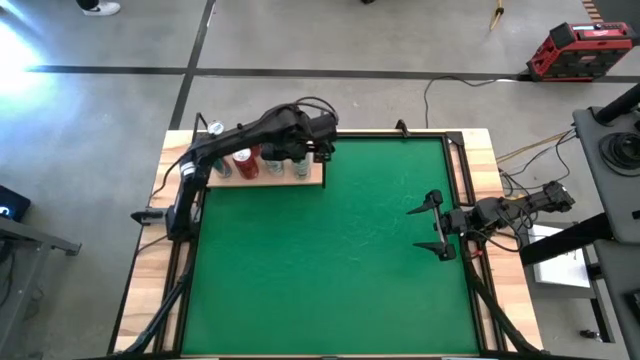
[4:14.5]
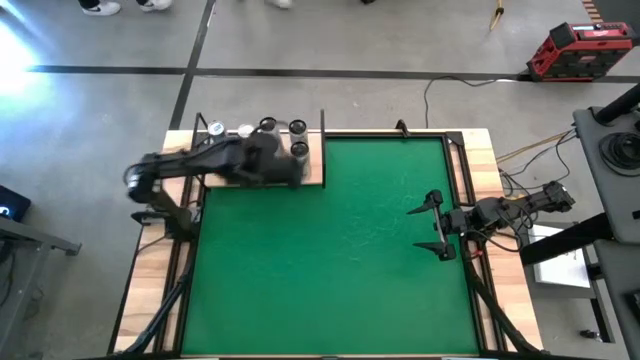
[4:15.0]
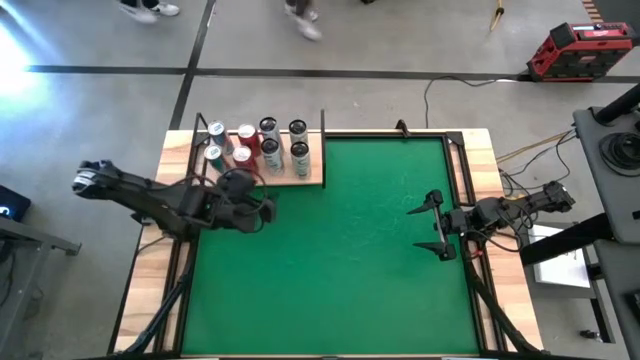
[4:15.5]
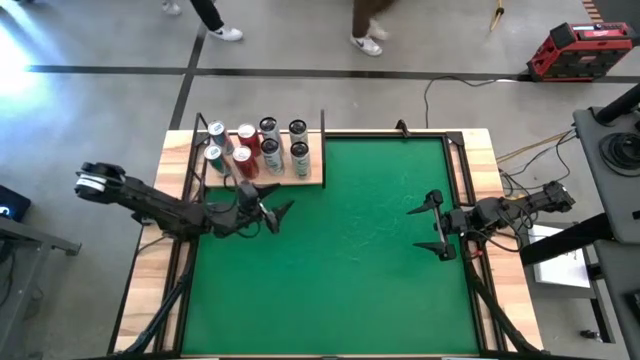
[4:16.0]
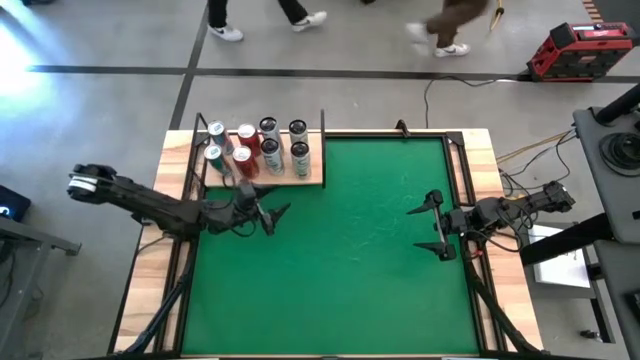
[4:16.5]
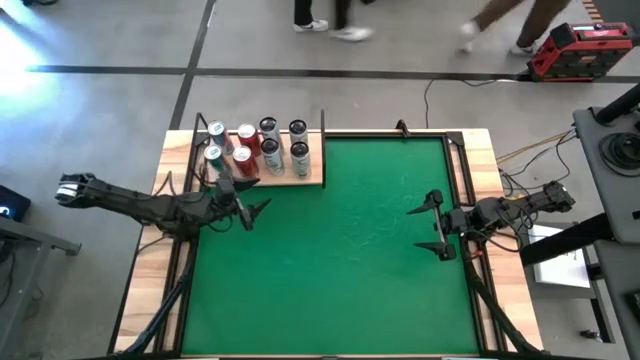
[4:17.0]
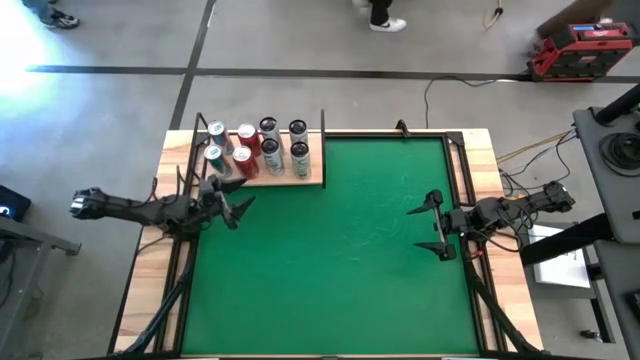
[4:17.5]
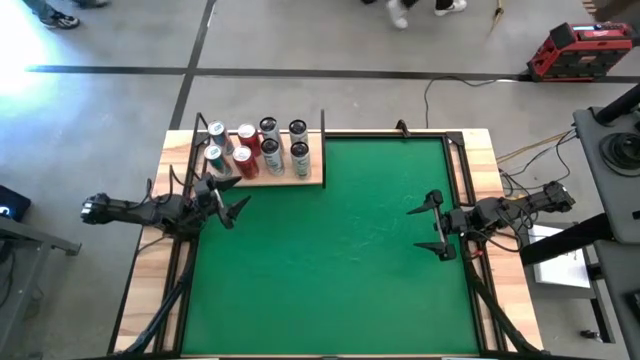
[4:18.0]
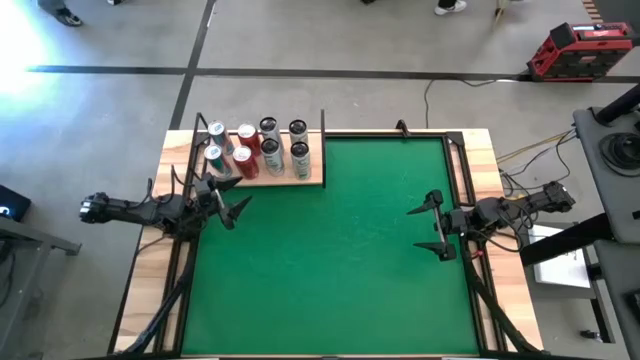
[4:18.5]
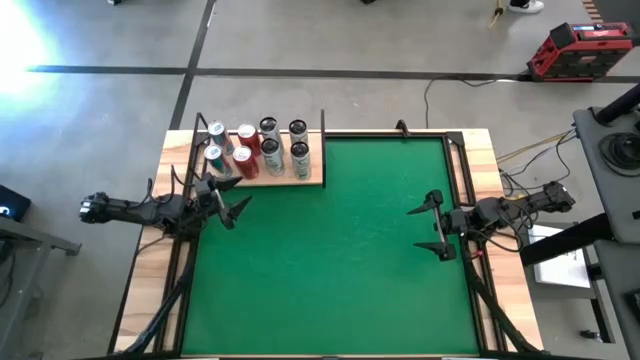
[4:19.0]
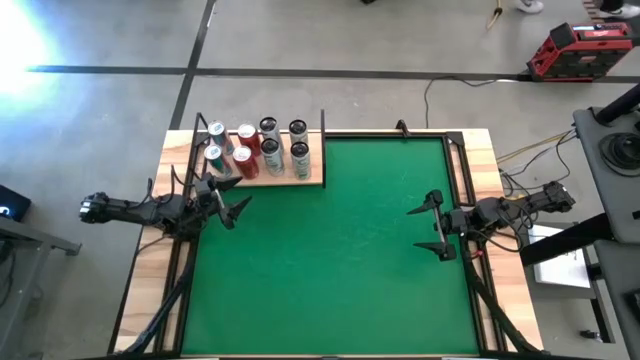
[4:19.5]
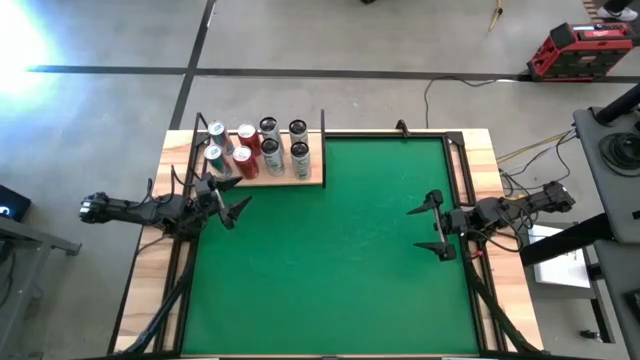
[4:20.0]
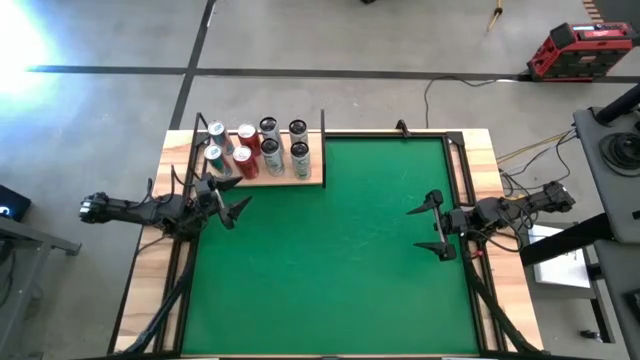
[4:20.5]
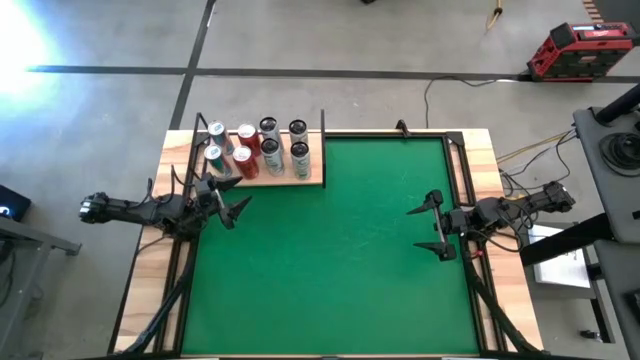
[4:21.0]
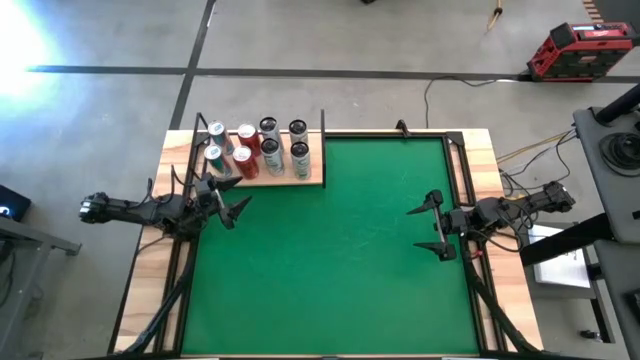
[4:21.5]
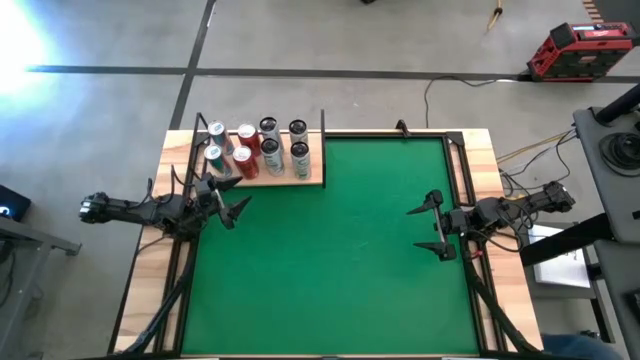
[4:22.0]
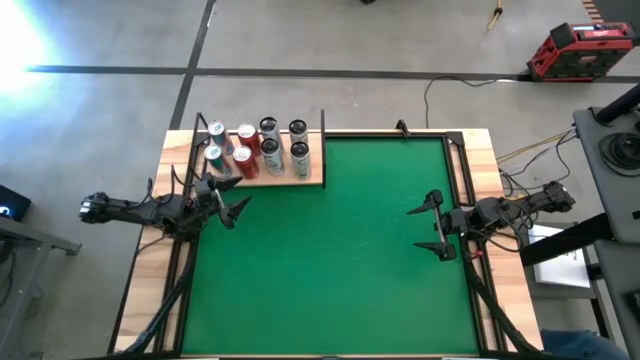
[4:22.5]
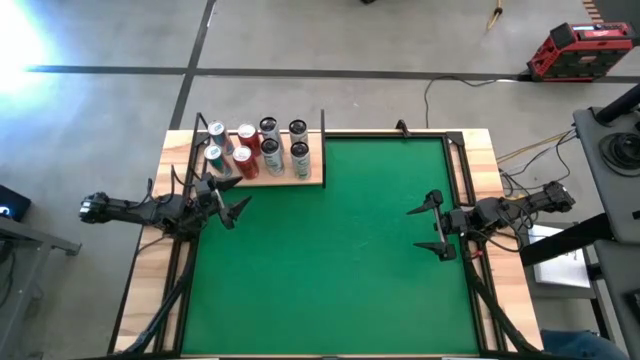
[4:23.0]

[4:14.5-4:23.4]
Task: Place canned beverage on shelf
Return to Home Position

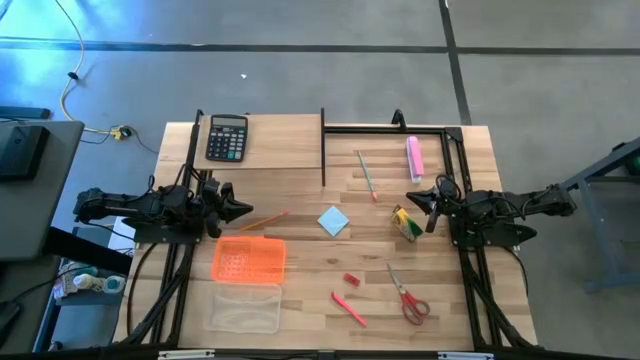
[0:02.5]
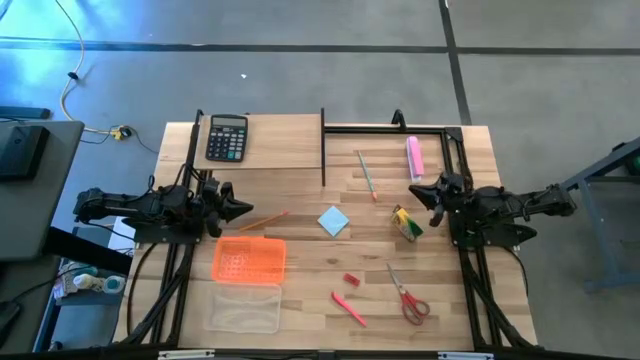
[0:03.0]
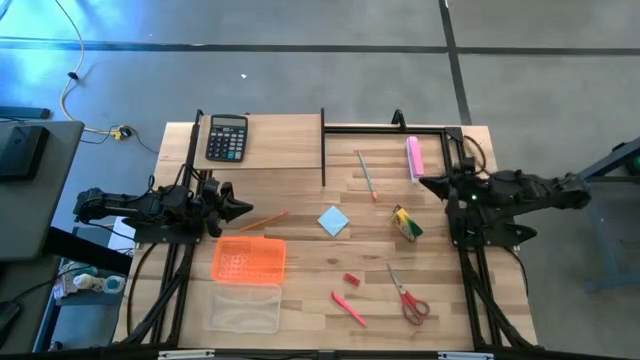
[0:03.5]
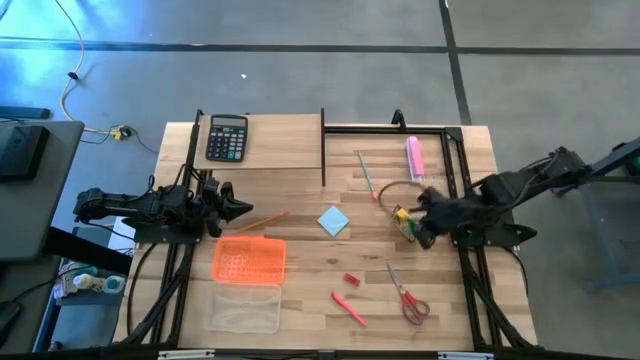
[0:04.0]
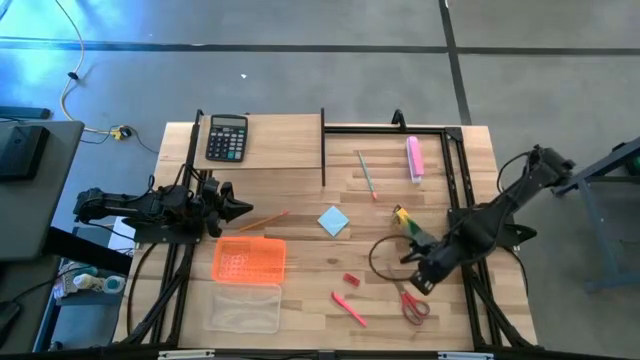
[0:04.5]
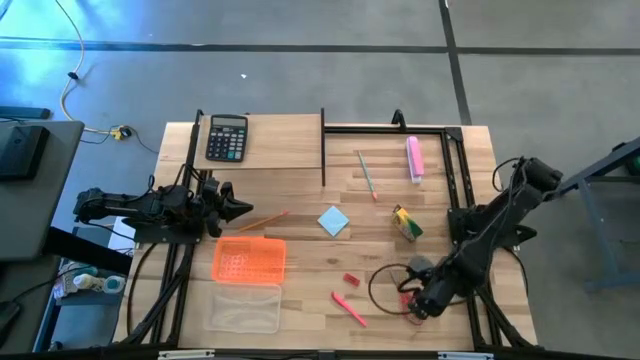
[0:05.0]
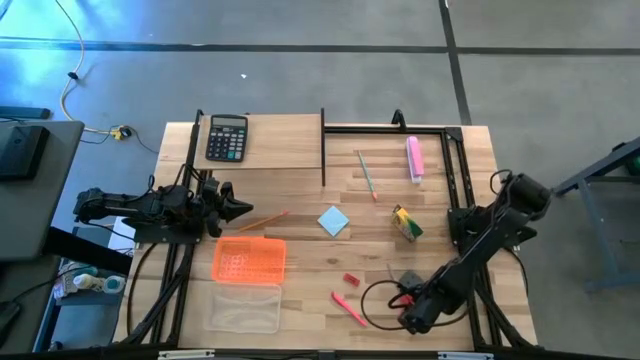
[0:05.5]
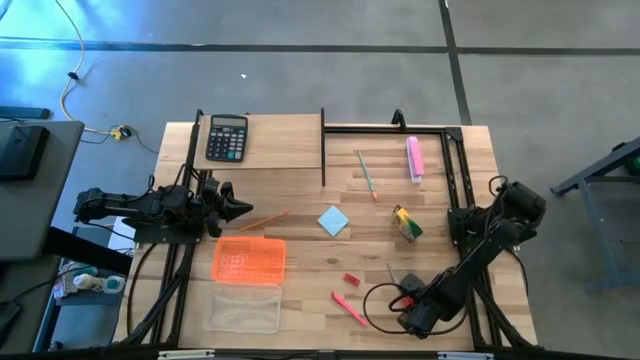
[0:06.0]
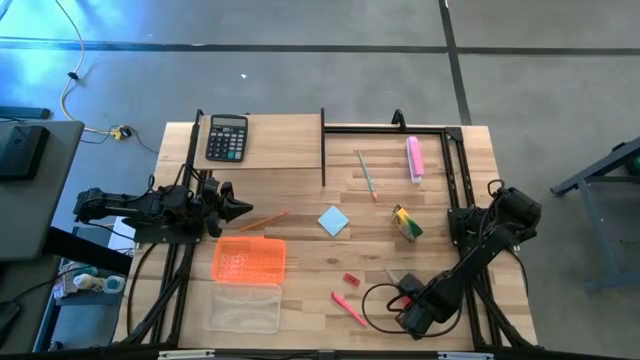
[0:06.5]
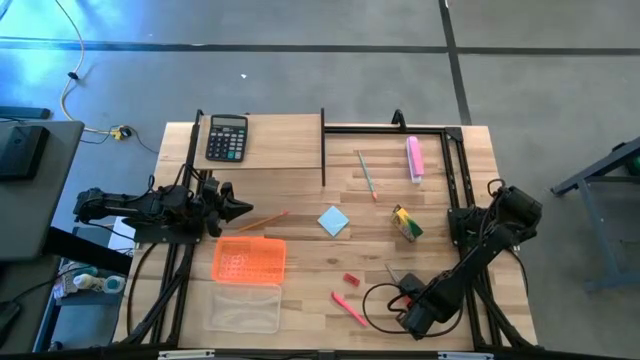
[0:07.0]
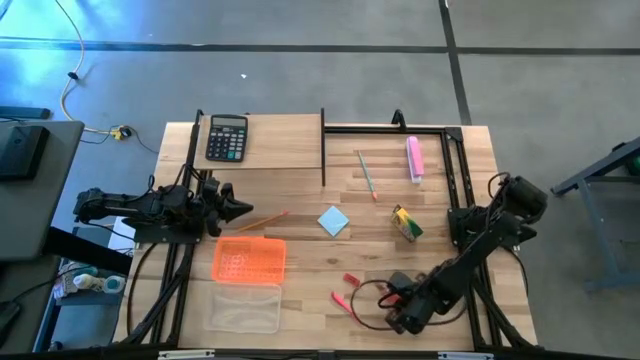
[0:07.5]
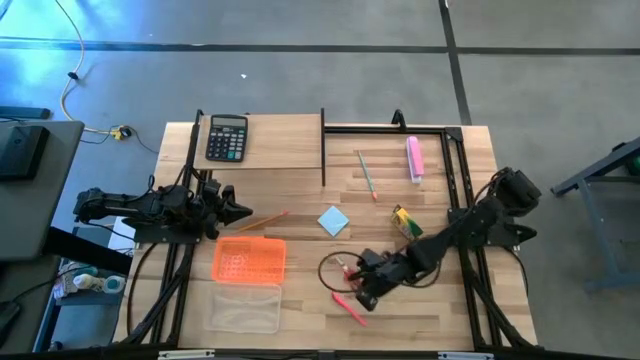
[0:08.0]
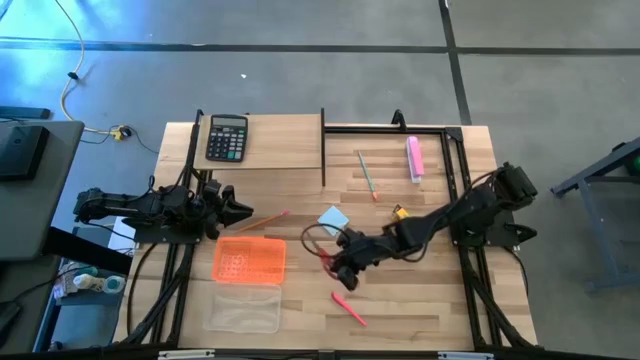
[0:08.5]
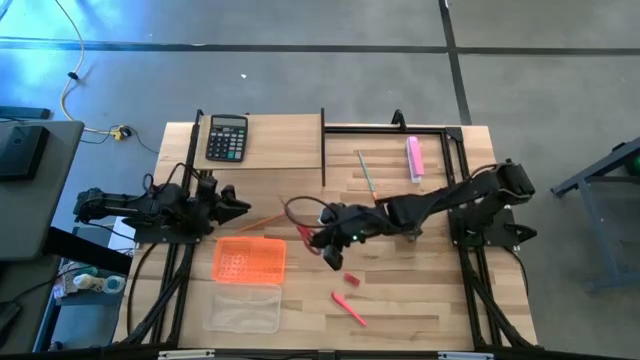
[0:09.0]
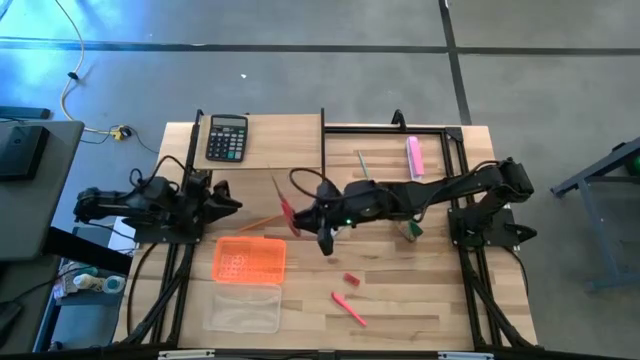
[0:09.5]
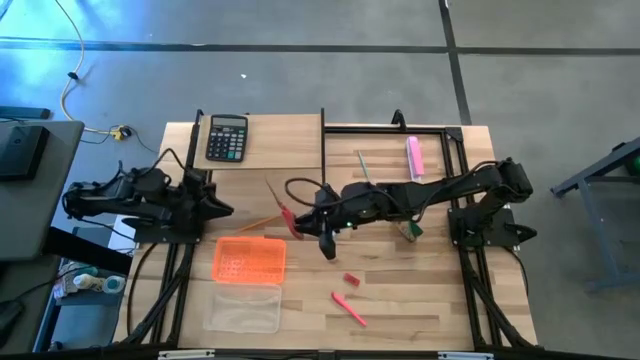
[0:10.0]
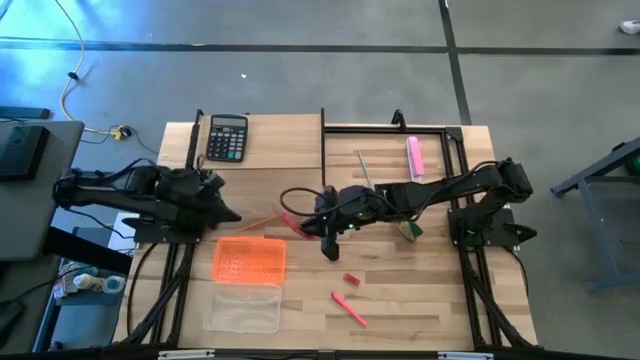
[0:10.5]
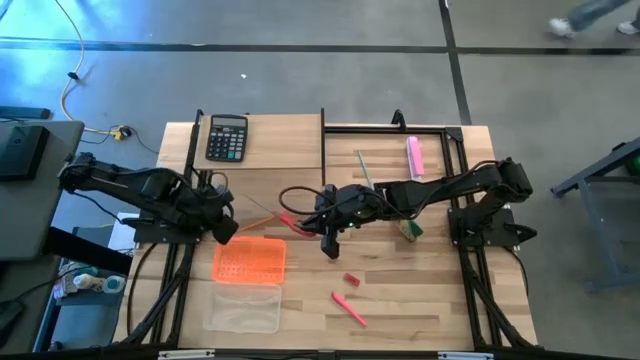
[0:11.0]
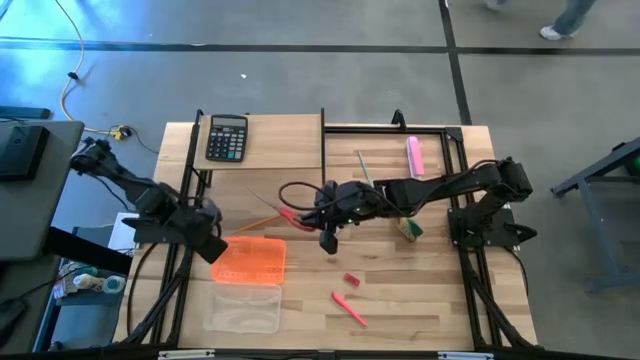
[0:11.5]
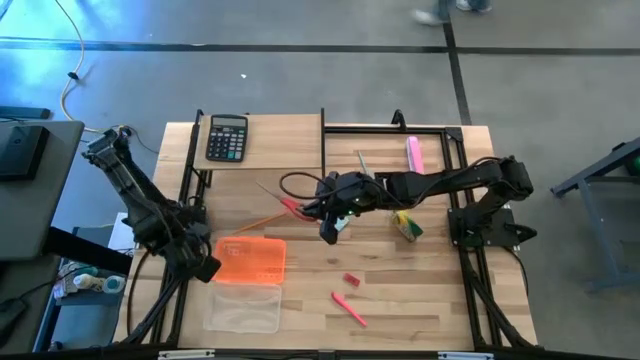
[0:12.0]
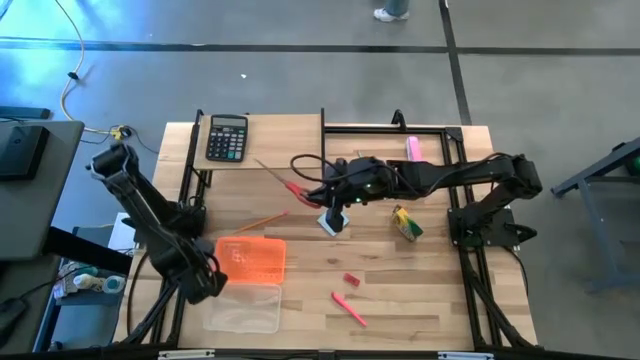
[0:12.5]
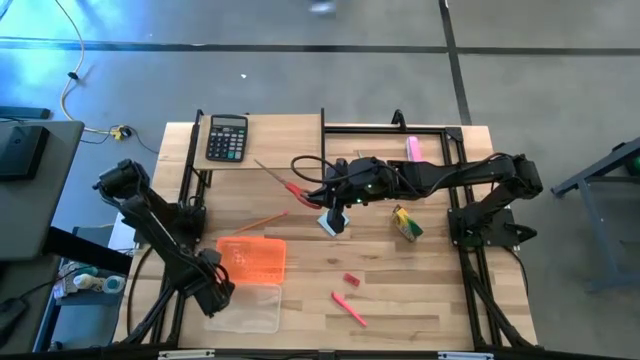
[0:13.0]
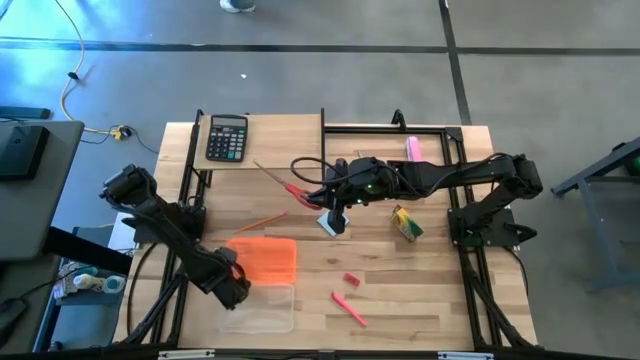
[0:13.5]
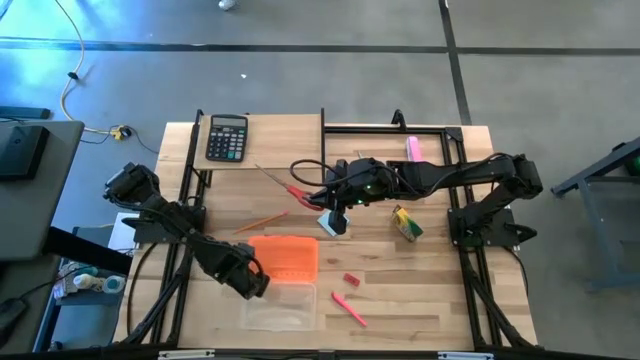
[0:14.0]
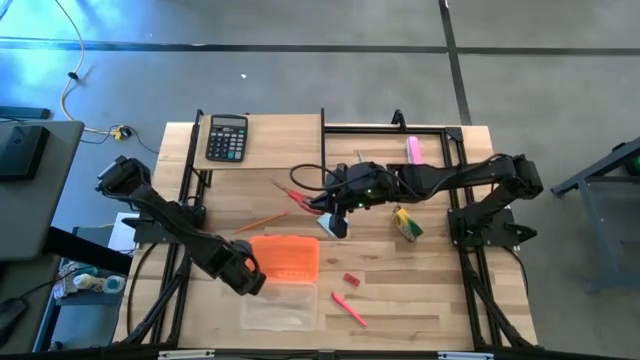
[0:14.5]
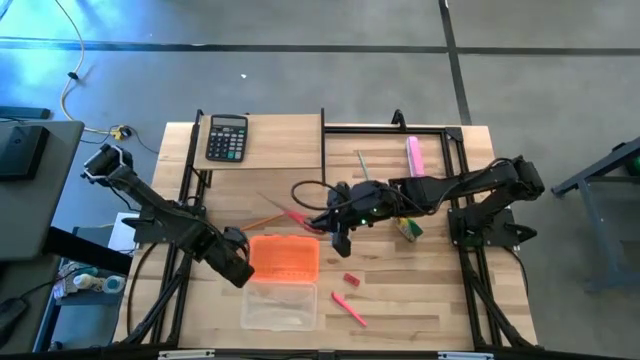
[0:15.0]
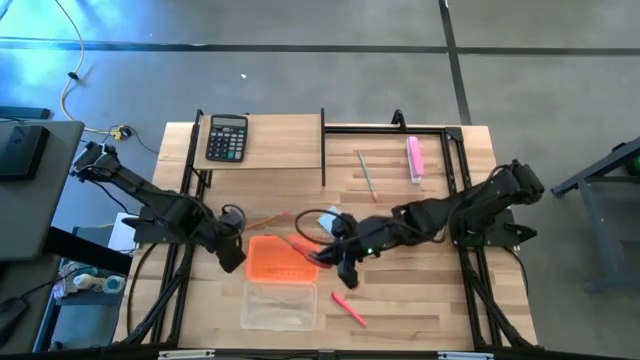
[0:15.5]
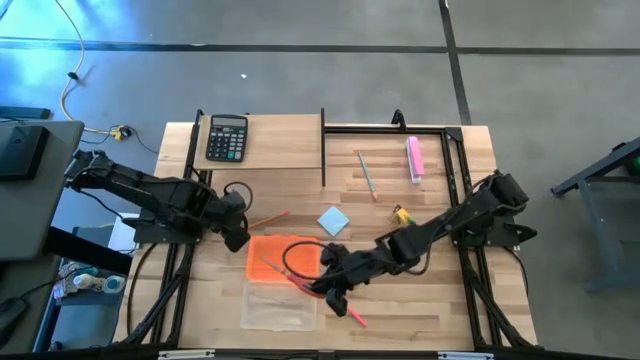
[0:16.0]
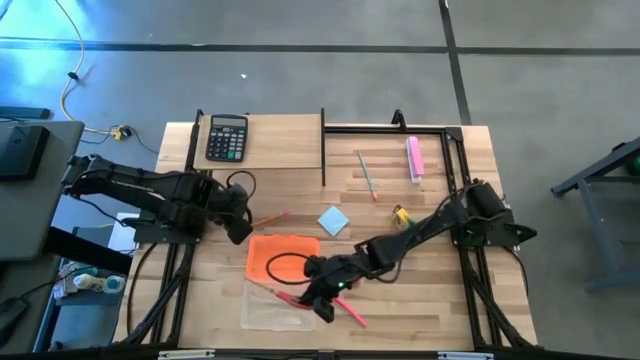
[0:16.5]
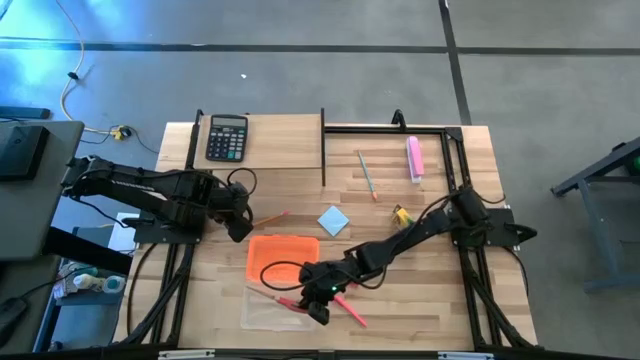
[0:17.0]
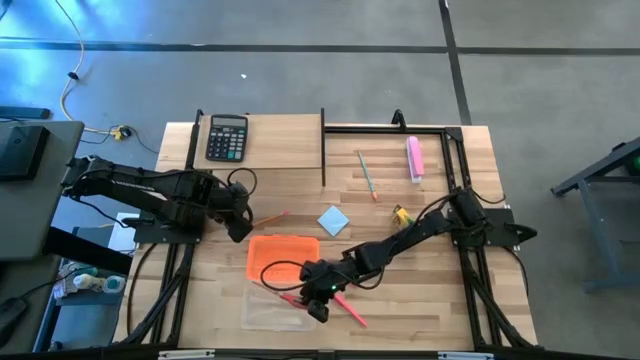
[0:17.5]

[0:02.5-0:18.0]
Task: Pack school essentials
Put the red scissors in the orange supply box
